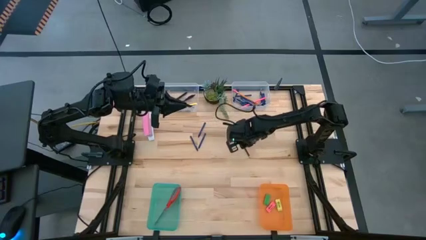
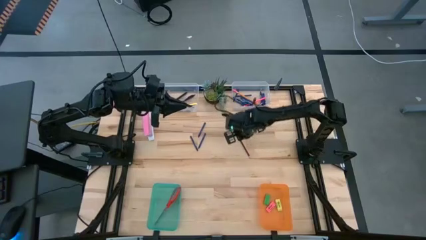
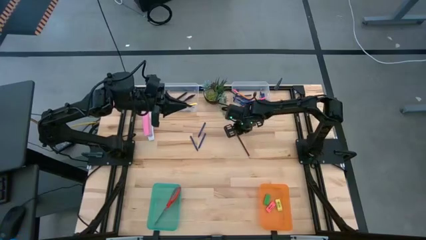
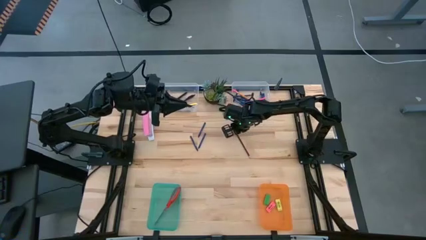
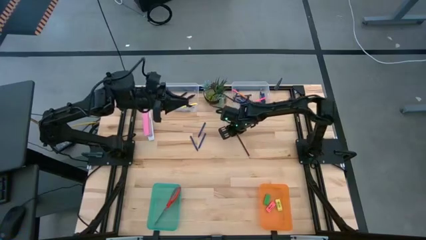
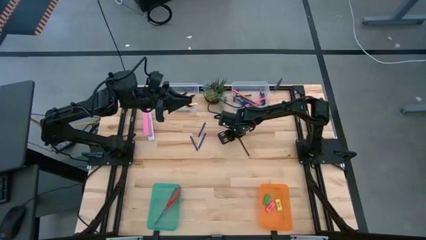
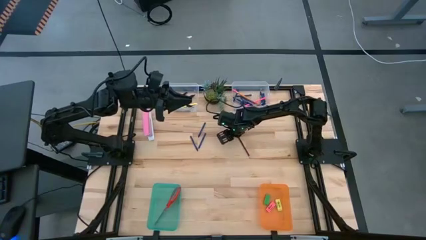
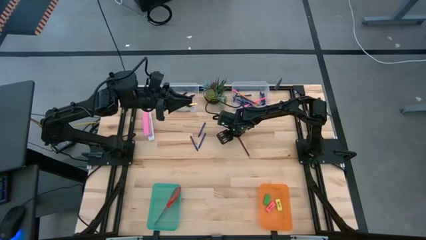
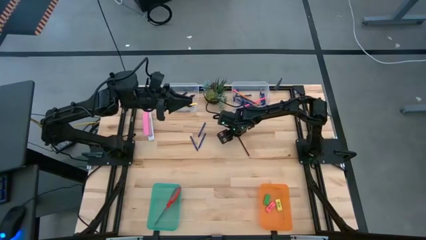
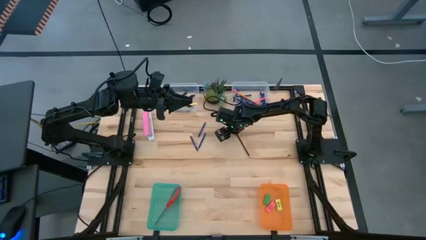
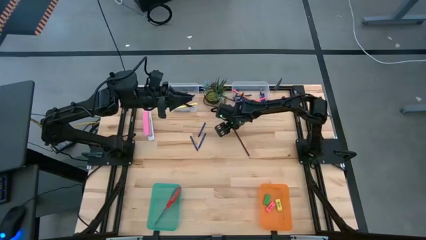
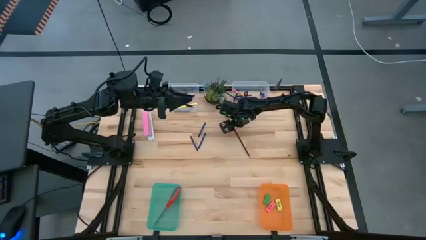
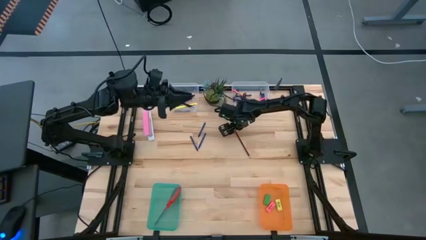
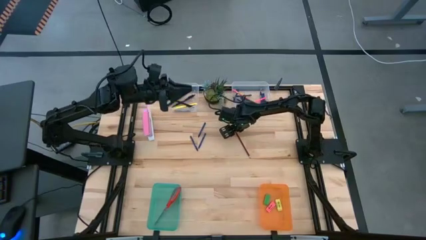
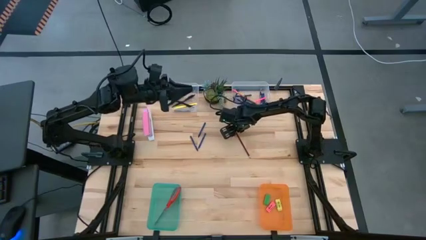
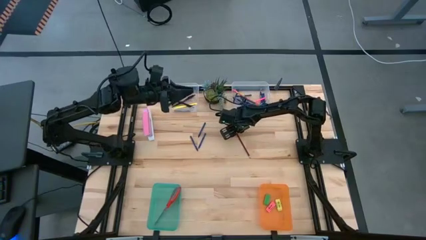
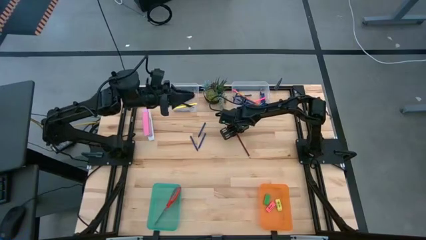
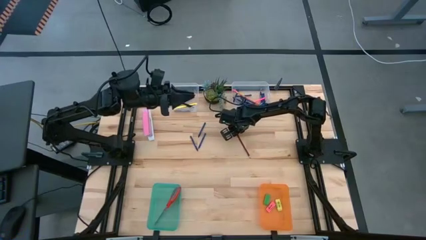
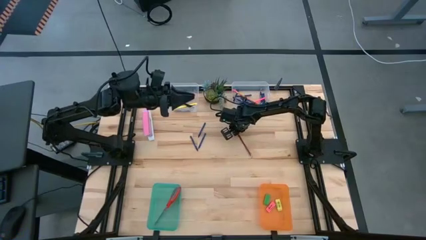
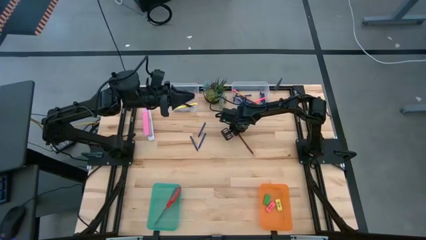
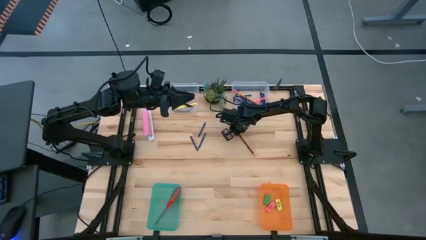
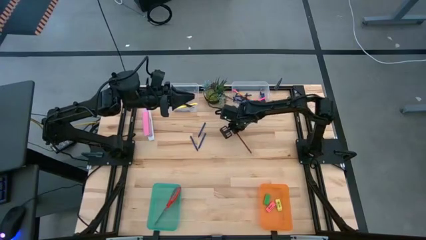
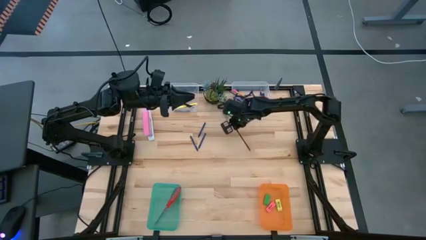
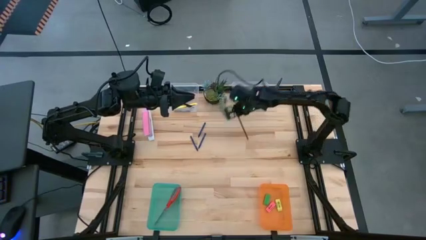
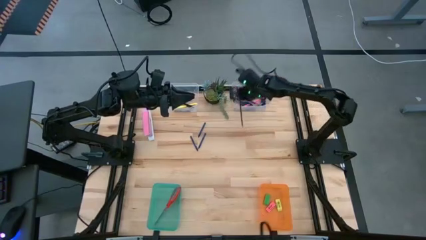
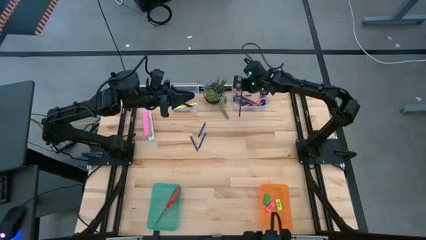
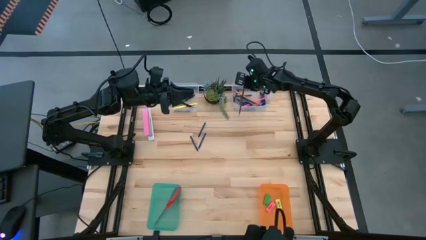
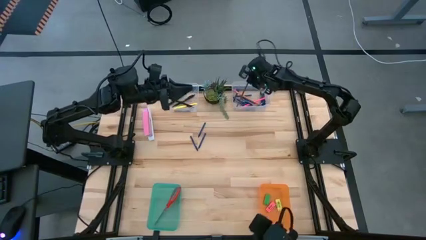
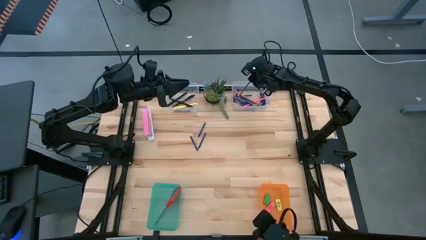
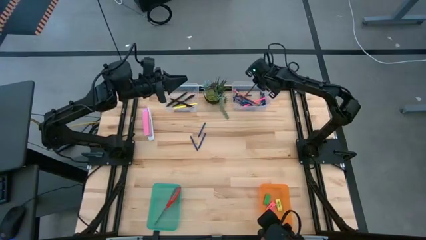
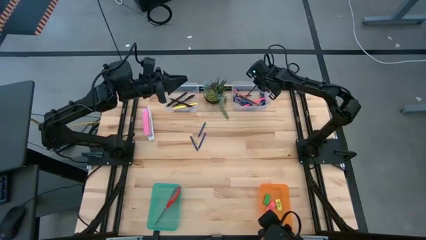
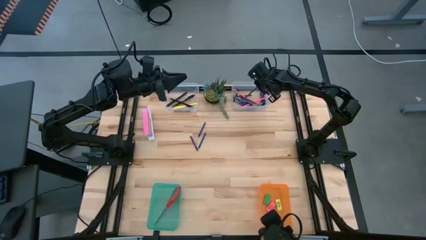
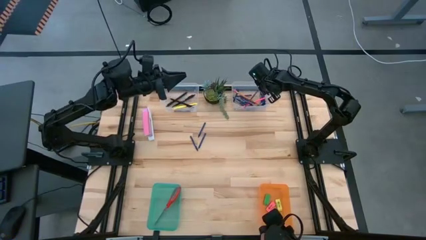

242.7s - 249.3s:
Task: Sort crayons/erasers/pens/pencils in bins
Put the brown pencil into the right transparent bin

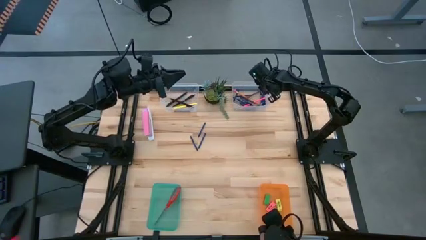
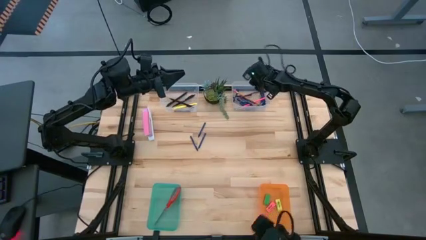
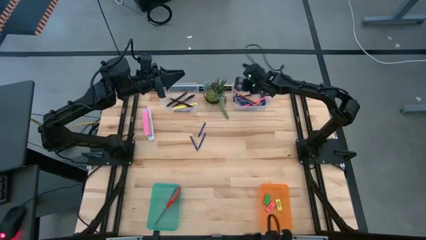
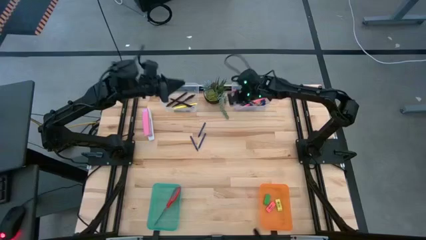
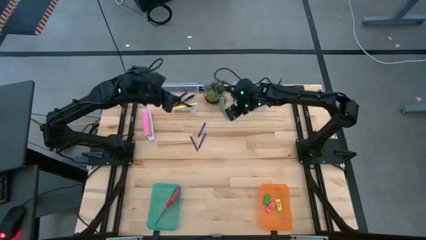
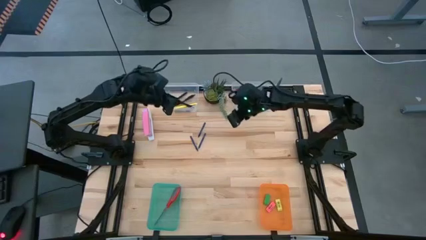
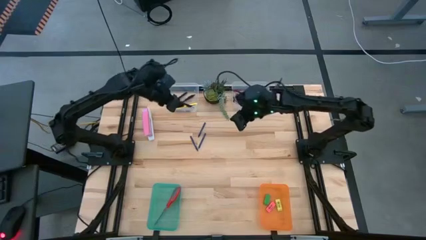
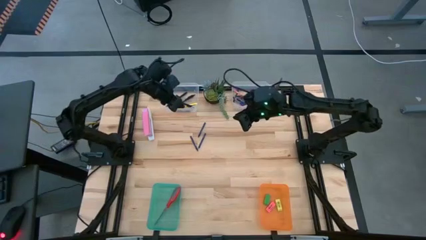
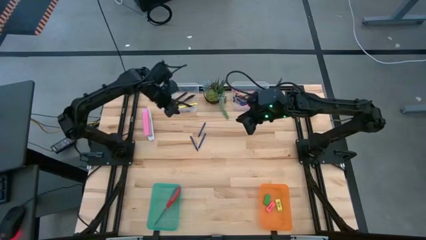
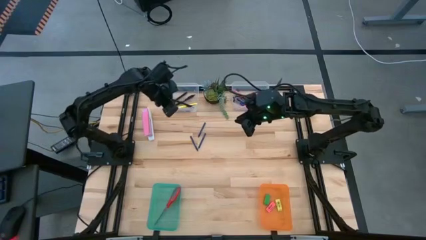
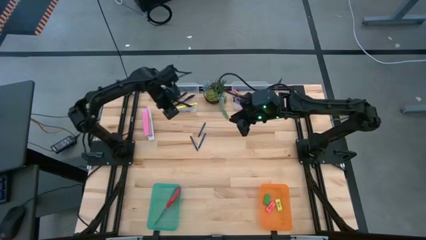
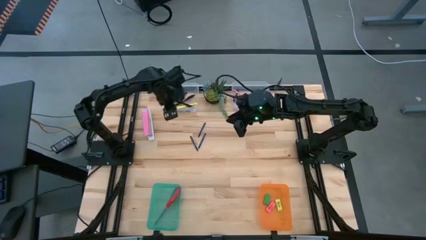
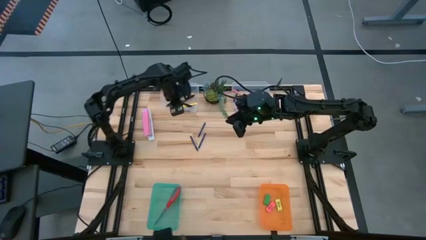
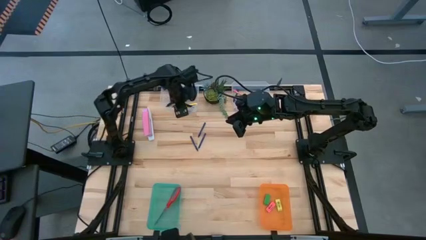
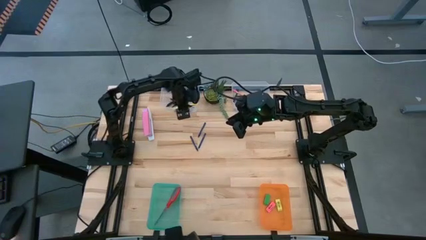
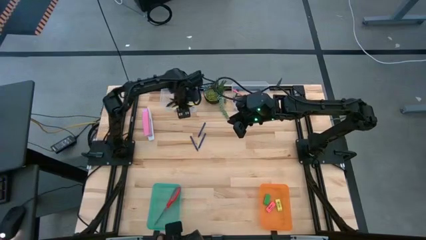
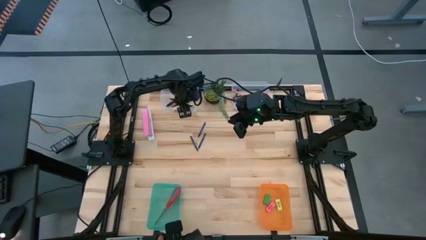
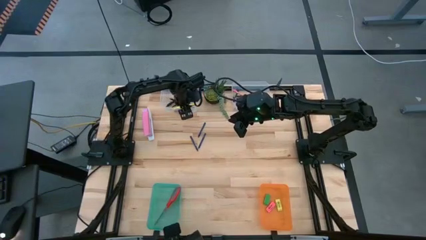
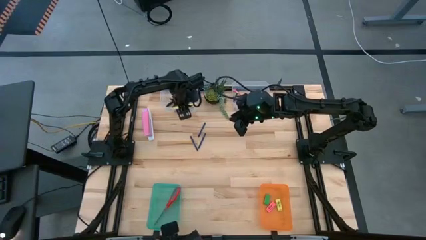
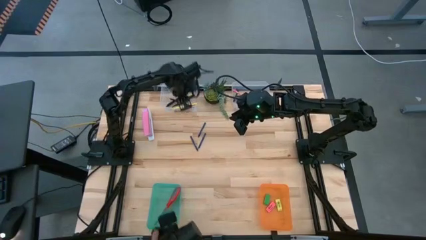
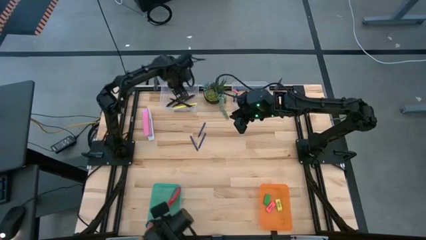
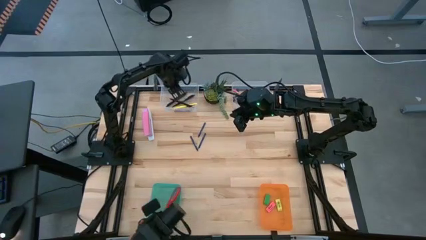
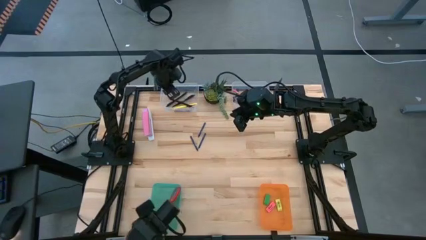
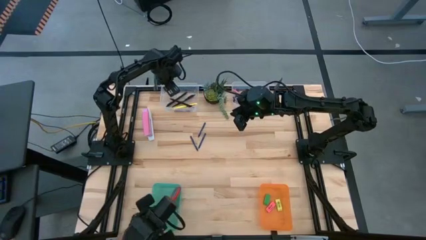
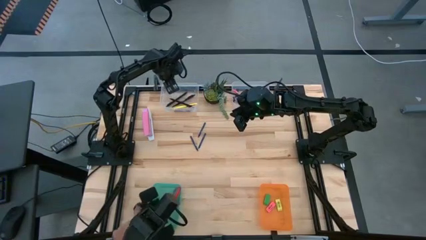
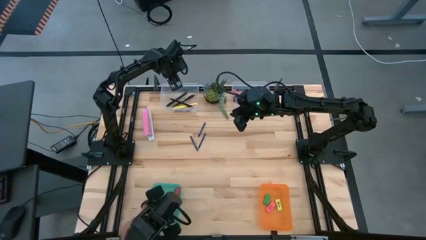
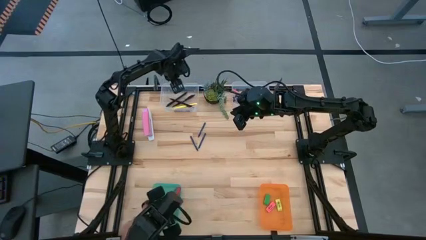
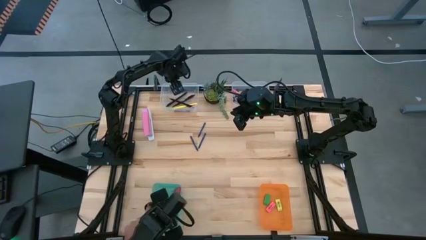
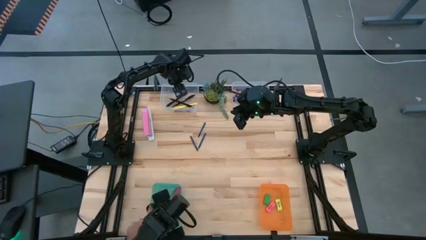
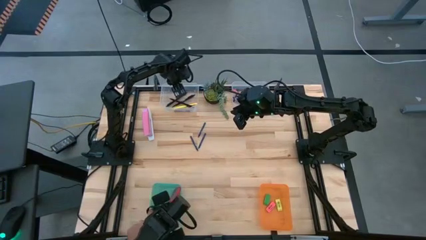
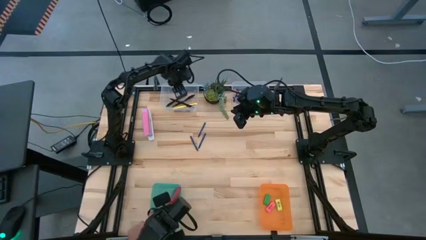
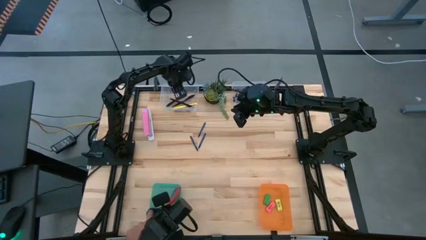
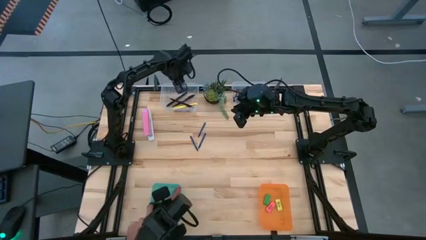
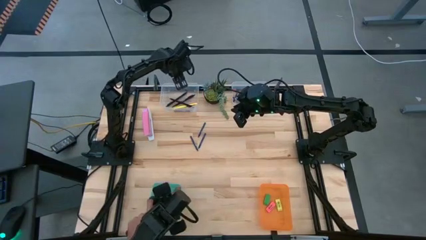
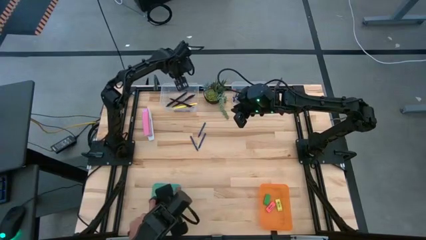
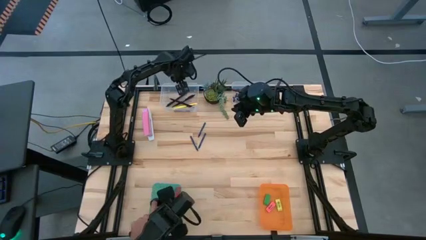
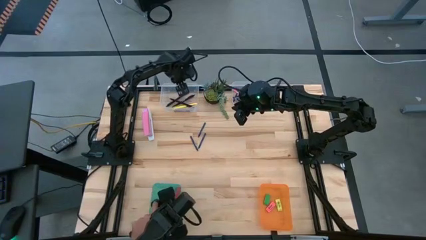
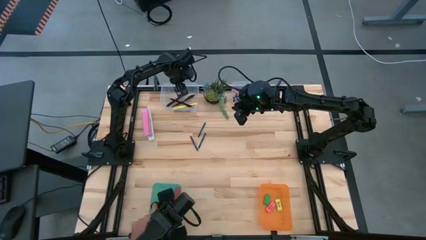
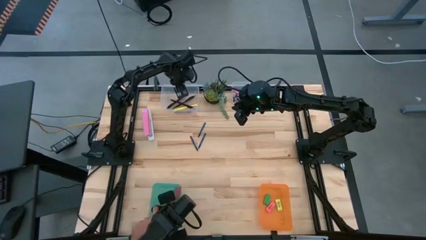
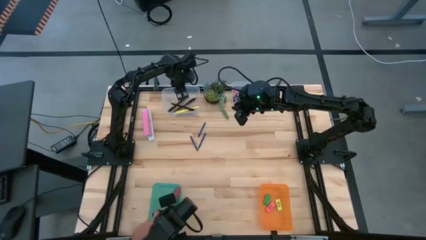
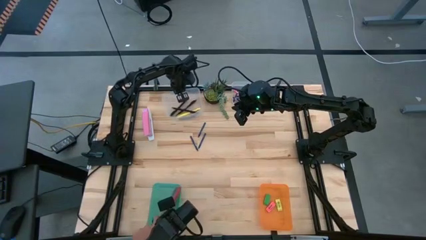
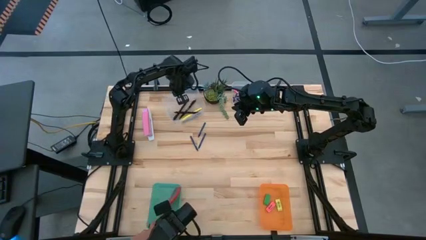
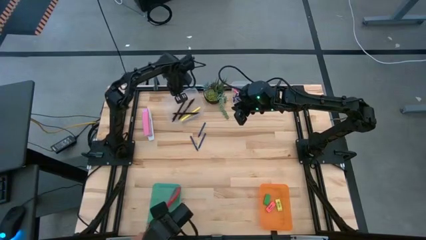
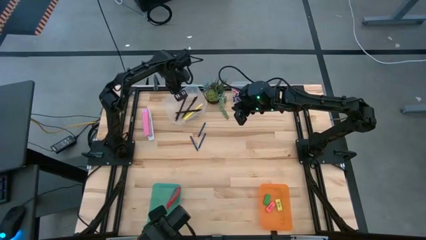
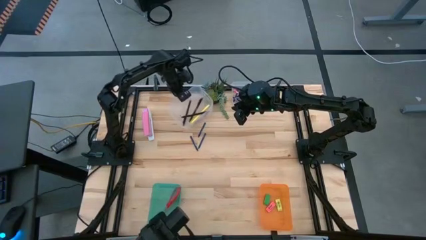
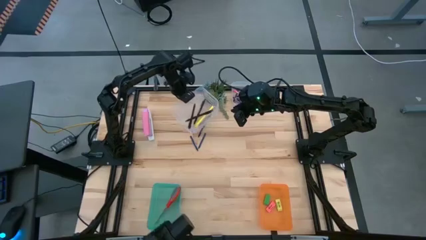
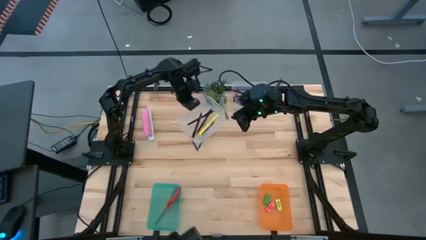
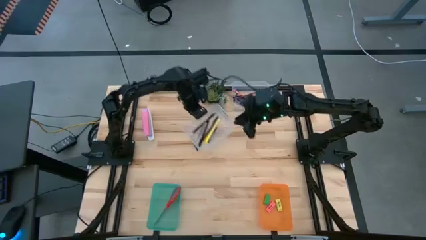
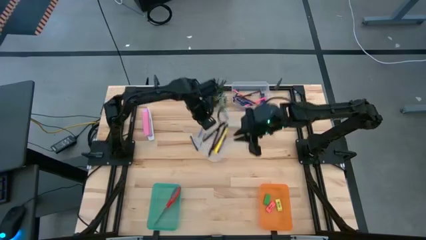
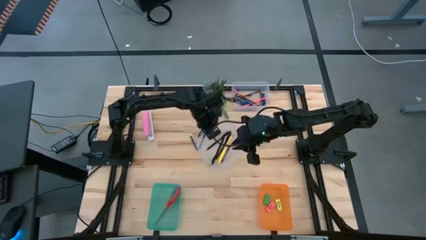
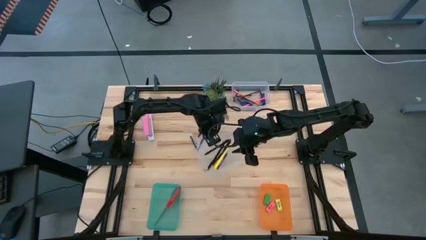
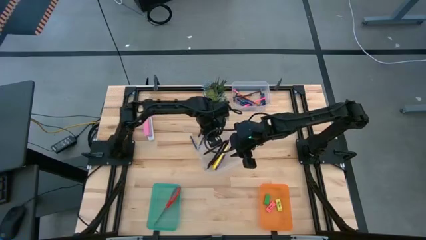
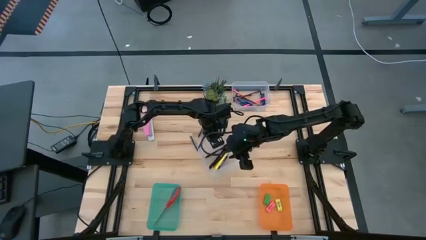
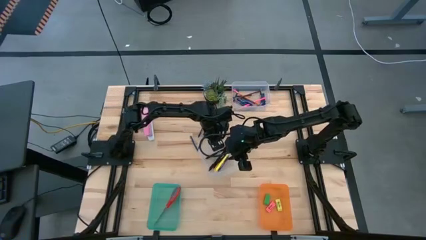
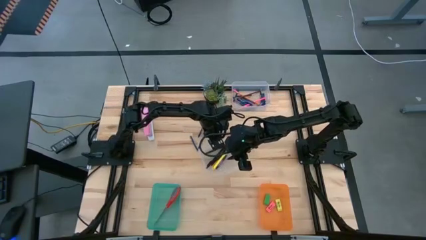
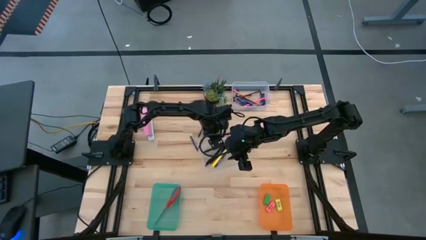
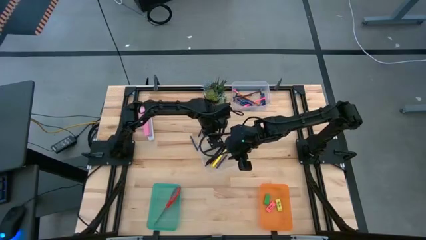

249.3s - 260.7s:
Move the left transparent bin to the center of the table
